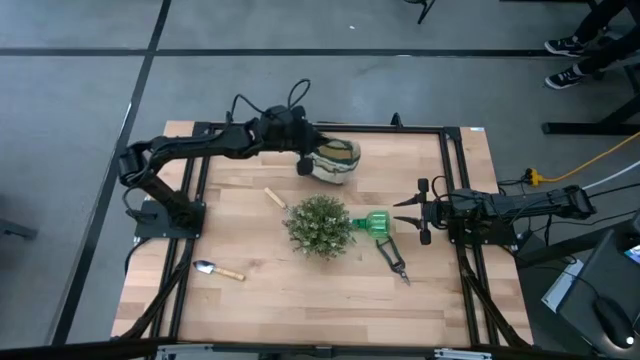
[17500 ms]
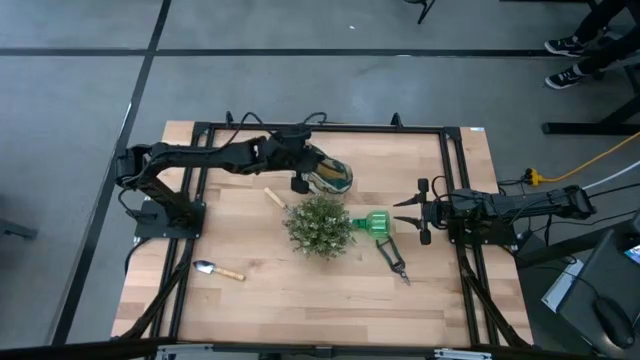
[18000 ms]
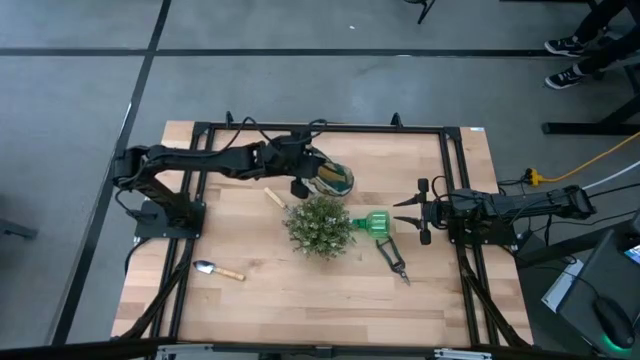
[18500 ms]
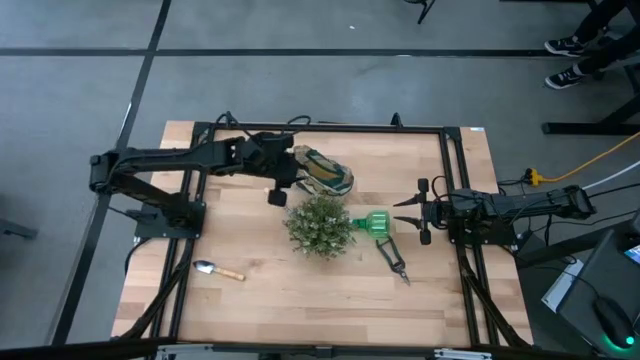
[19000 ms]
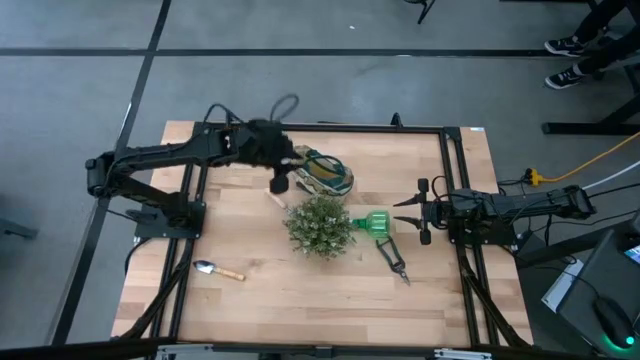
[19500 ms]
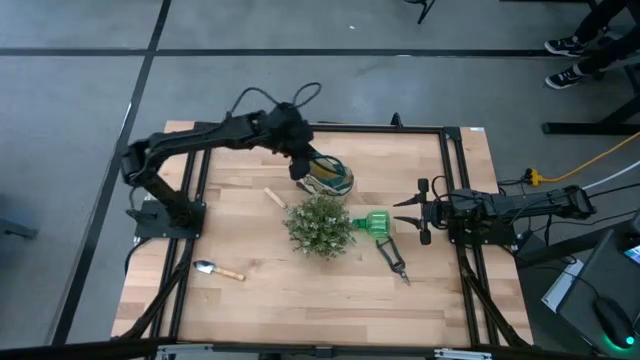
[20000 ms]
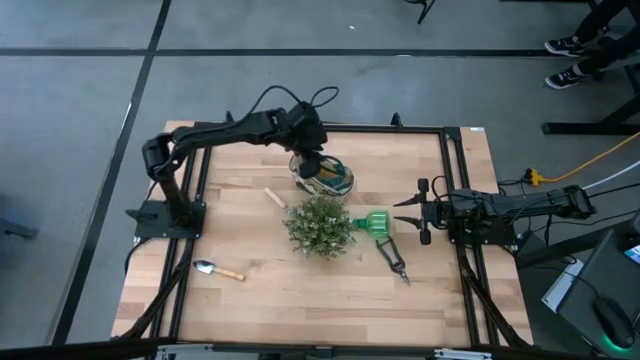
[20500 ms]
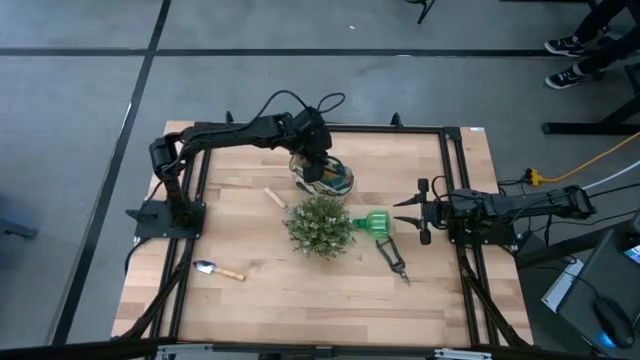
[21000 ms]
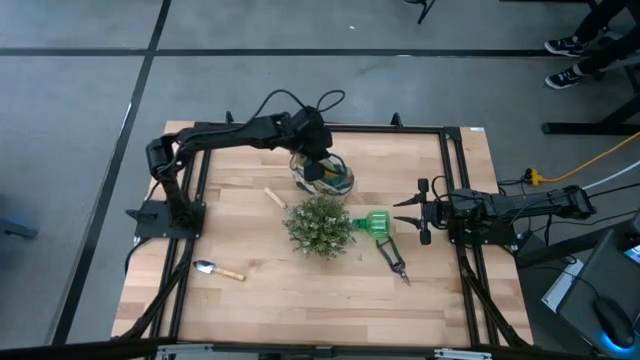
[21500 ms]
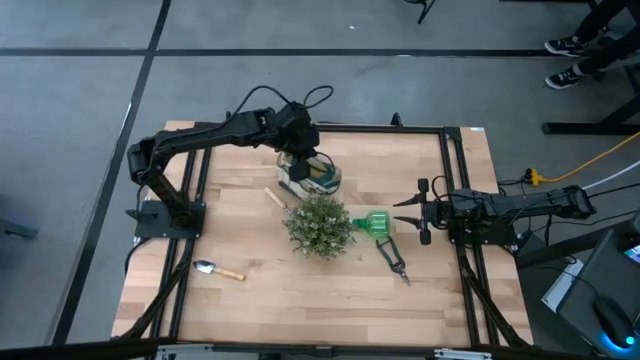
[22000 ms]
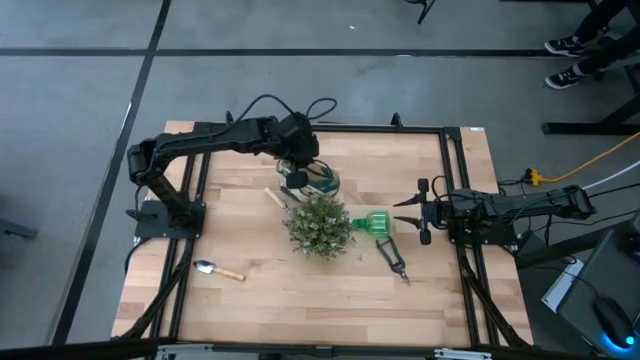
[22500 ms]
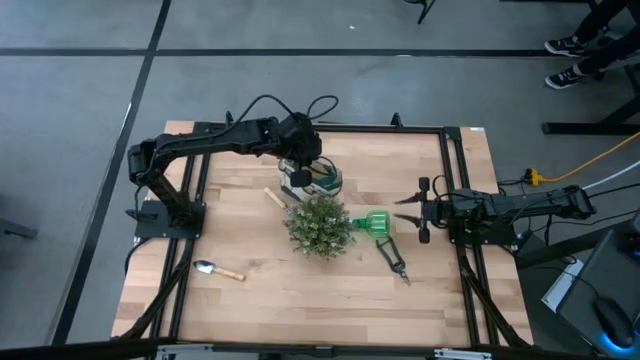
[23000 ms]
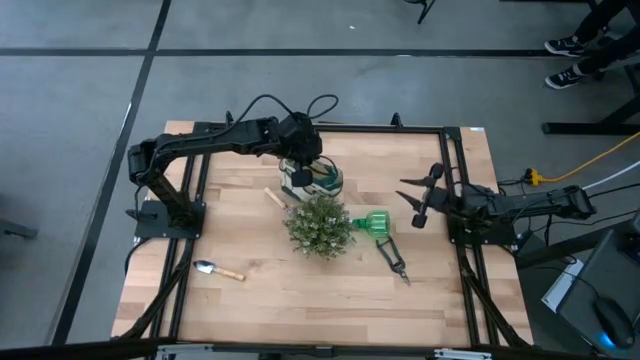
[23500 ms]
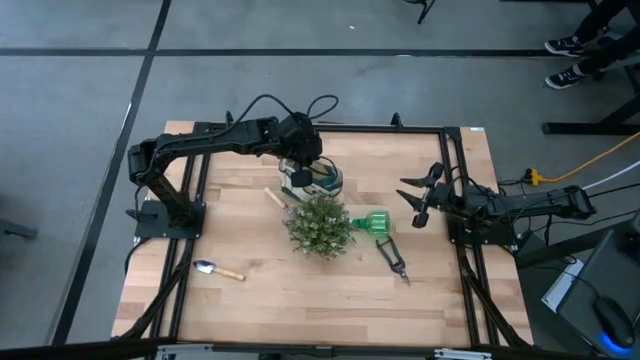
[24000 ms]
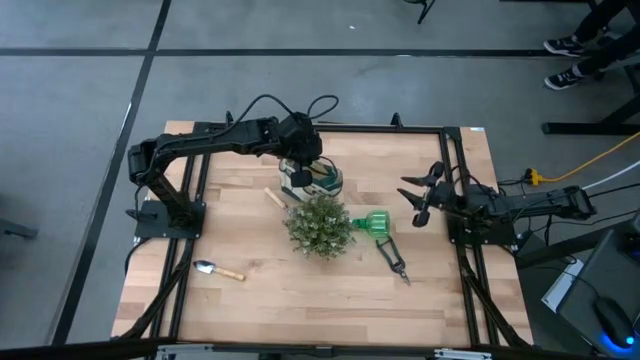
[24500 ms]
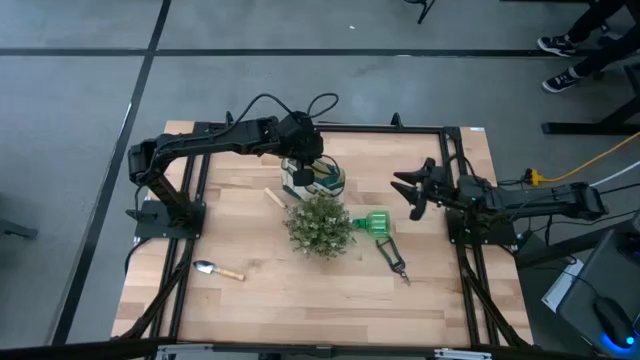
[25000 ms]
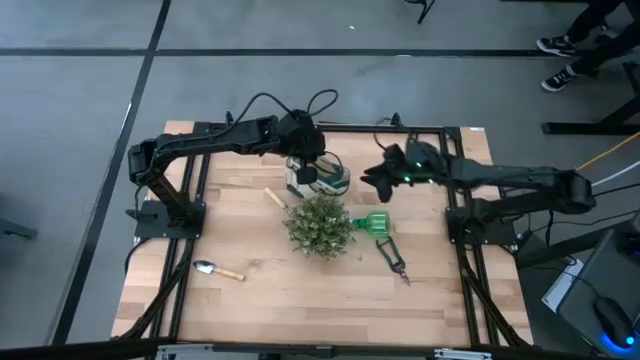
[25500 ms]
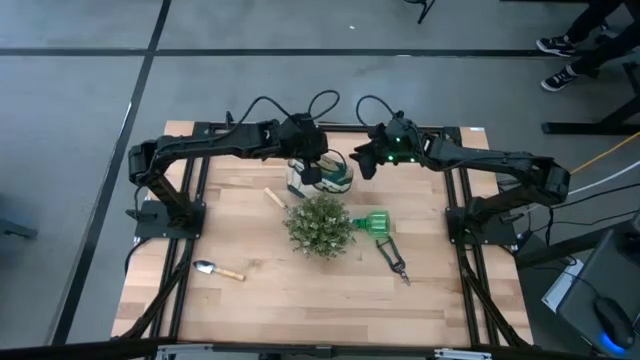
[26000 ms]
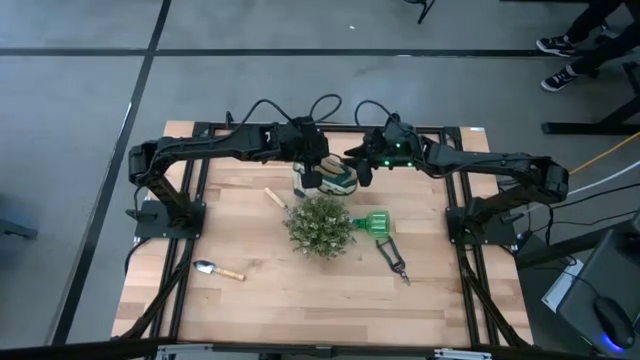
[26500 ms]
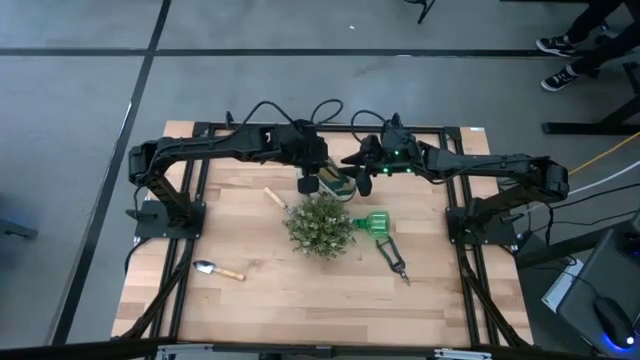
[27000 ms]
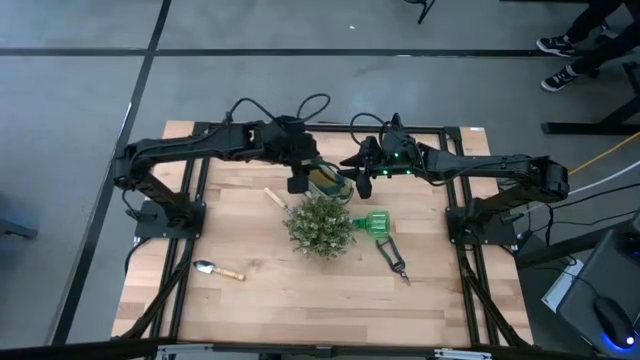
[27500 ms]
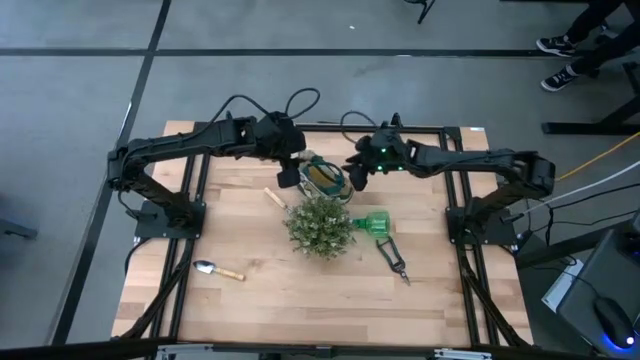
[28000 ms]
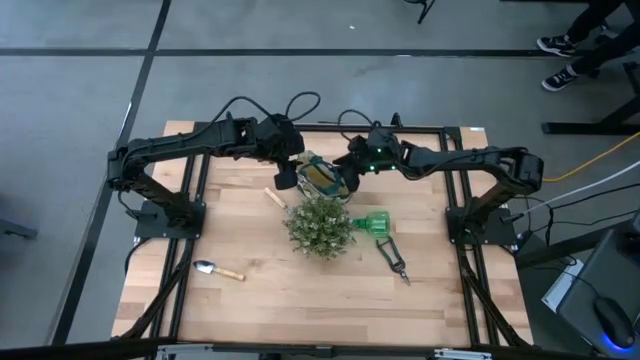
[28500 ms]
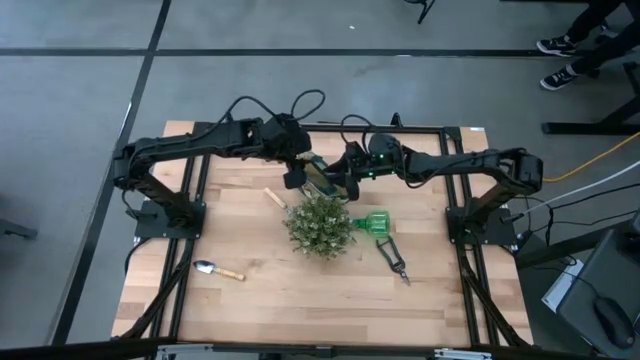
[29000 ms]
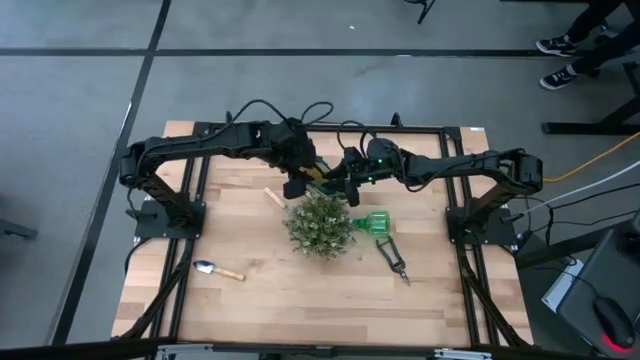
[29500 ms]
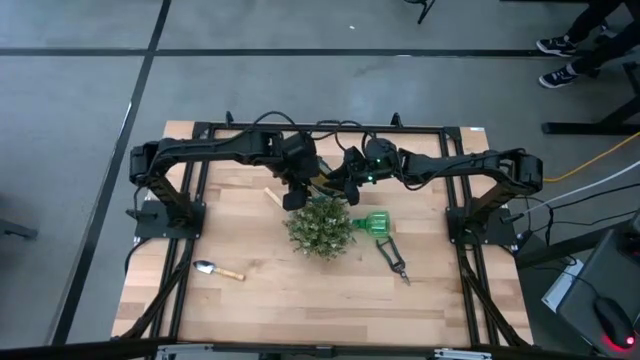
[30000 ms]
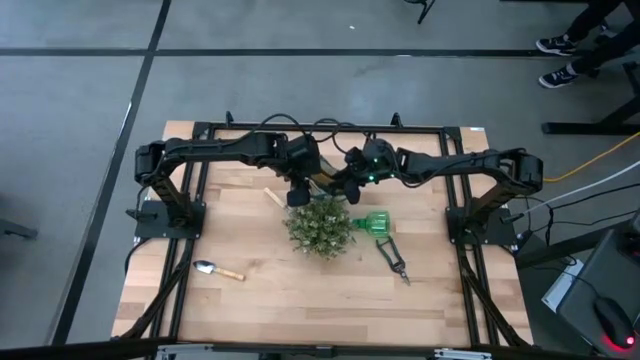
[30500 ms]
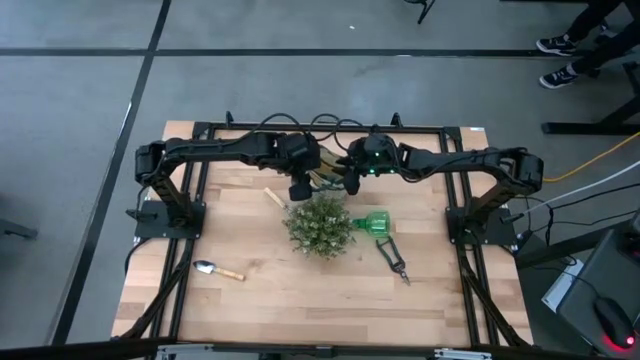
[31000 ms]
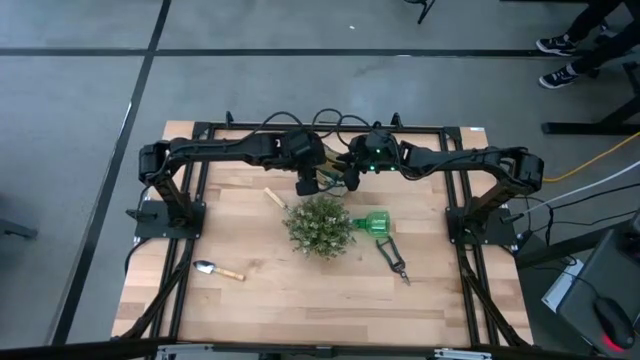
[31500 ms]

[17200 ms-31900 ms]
Task: Pick & Place Garden tools in Gardening bag
Prepare the green green gardening bag

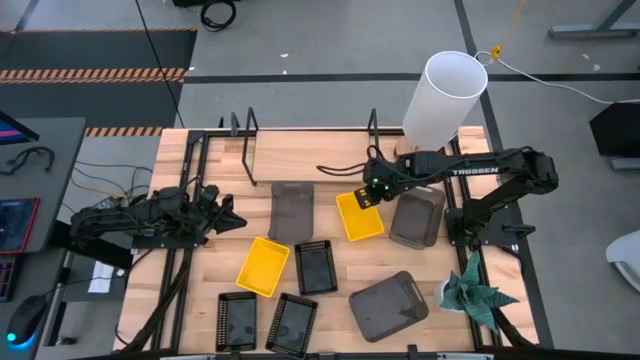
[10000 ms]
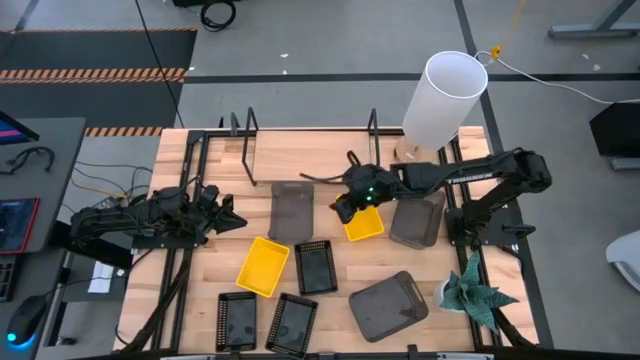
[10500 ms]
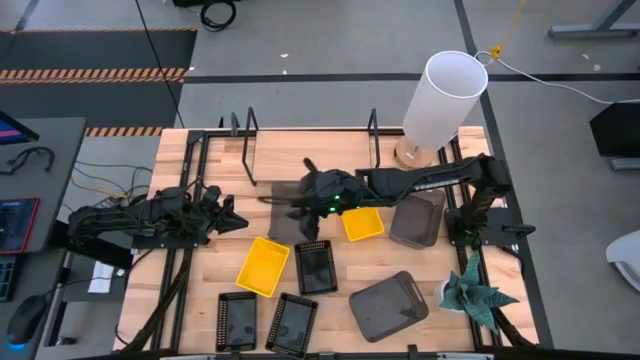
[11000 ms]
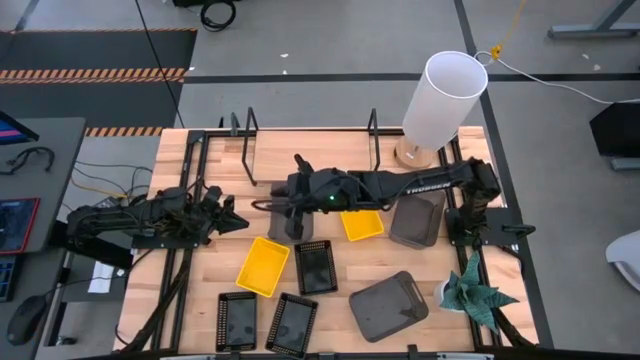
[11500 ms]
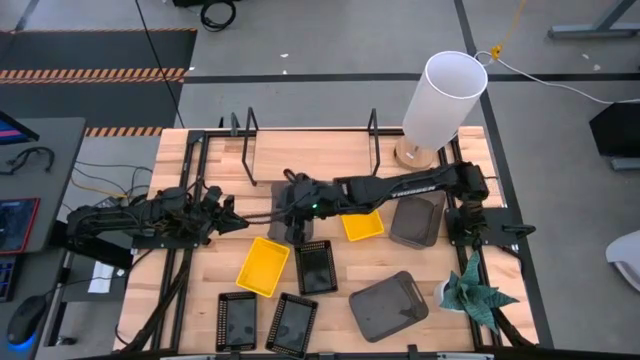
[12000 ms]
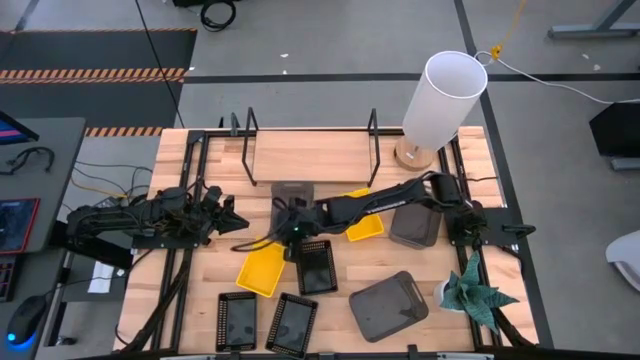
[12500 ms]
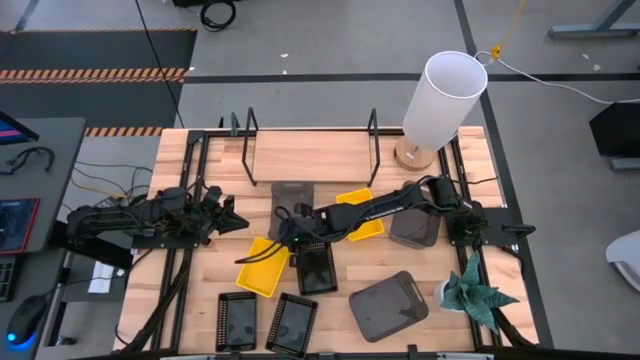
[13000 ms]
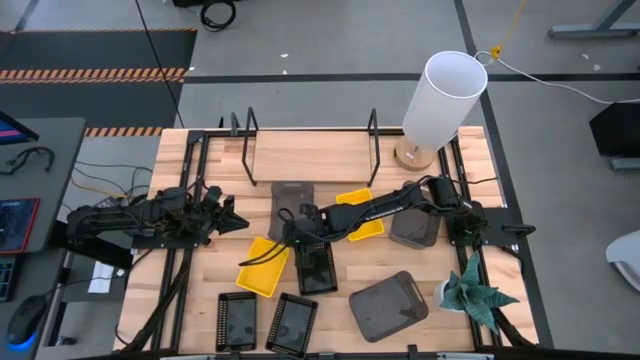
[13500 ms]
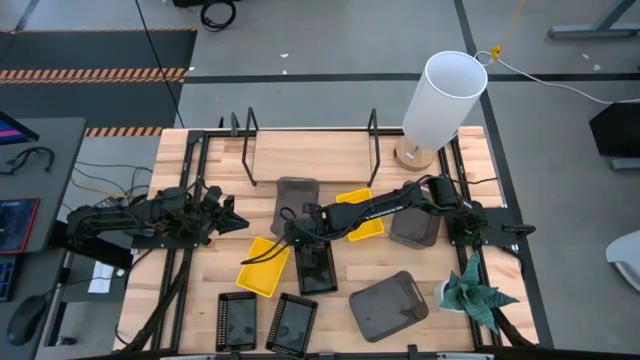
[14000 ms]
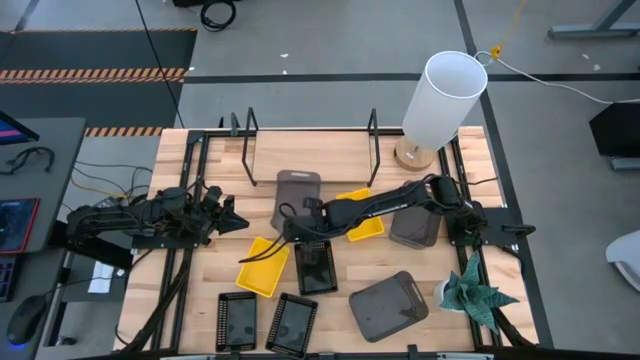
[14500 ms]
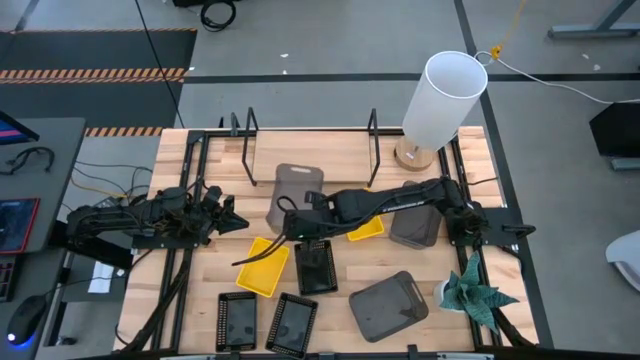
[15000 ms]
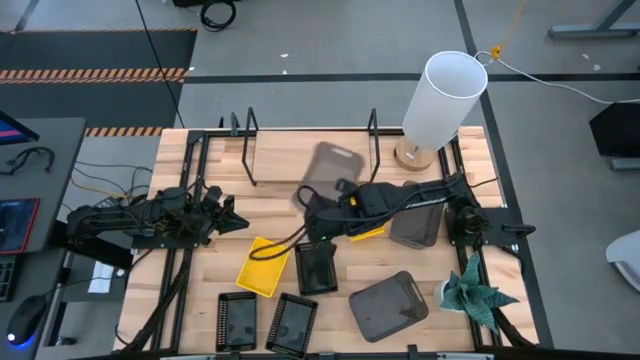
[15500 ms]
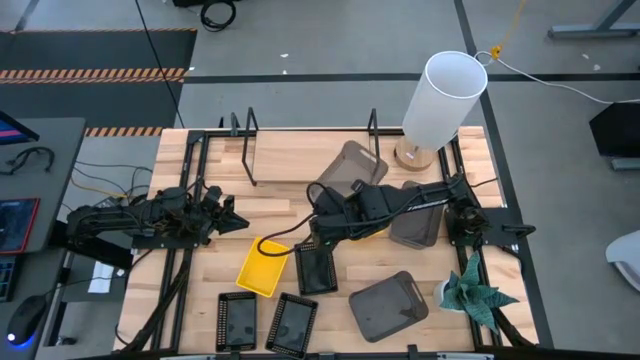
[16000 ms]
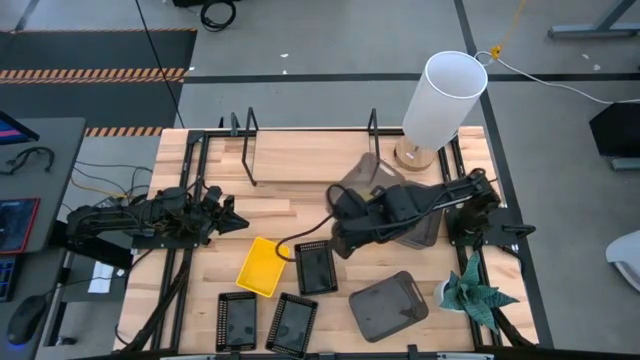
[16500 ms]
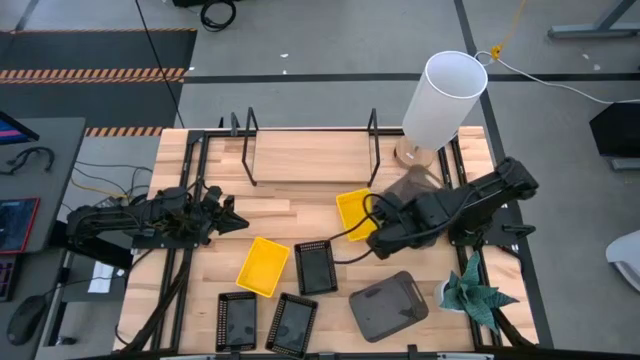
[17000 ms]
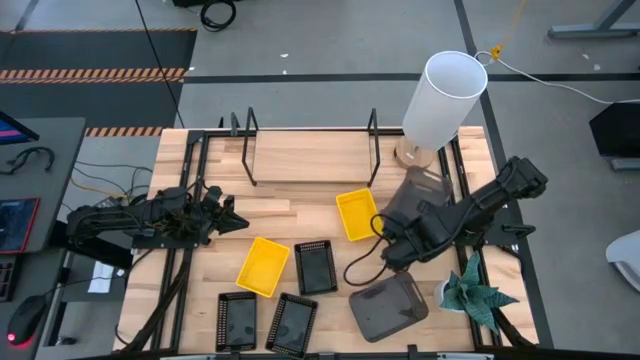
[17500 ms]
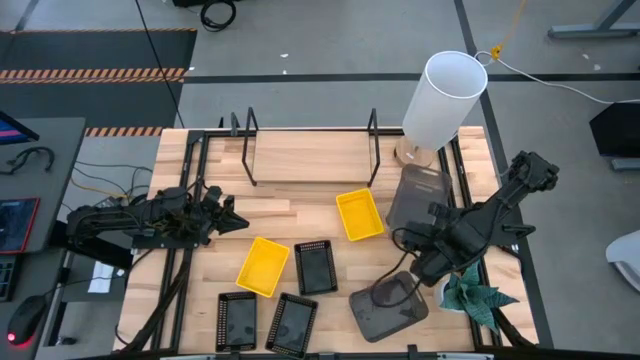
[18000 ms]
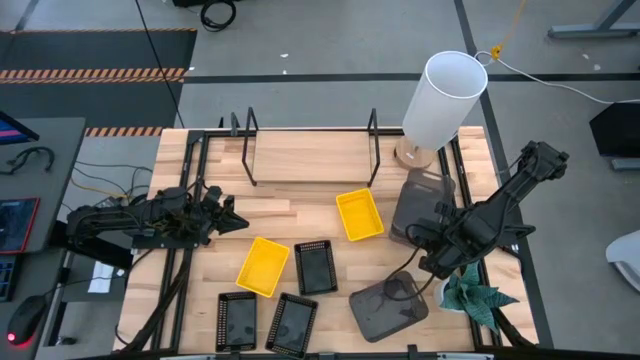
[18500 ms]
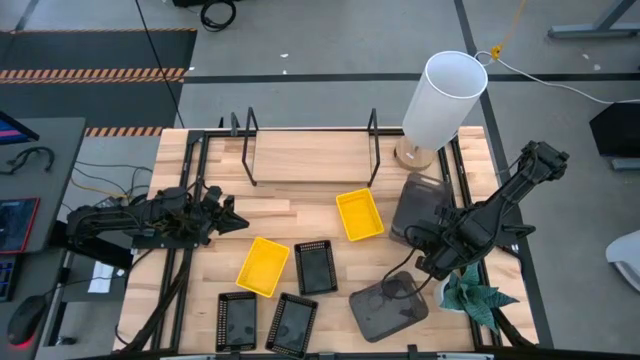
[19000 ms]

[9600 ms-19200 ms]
Task: Stack baskets on shelf by color
Stack the top left gray bin into the top right gray bin
